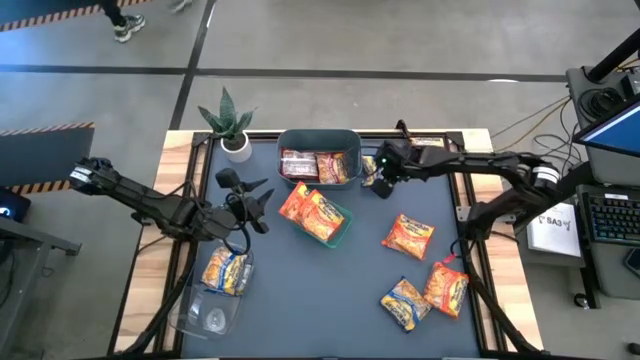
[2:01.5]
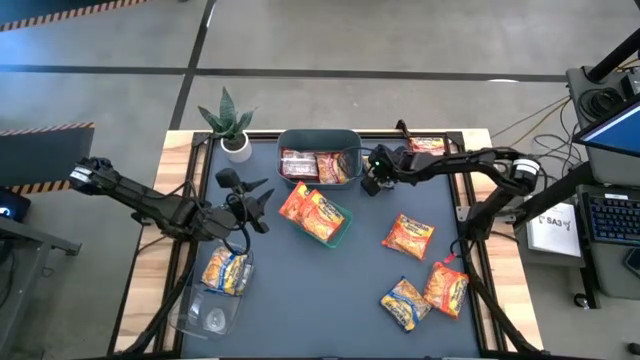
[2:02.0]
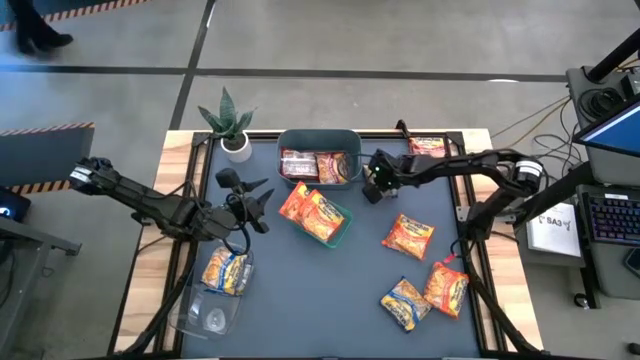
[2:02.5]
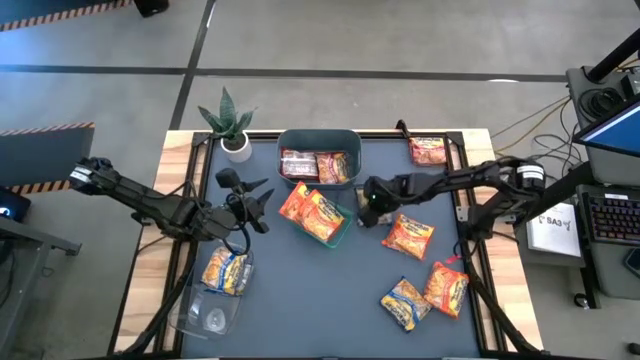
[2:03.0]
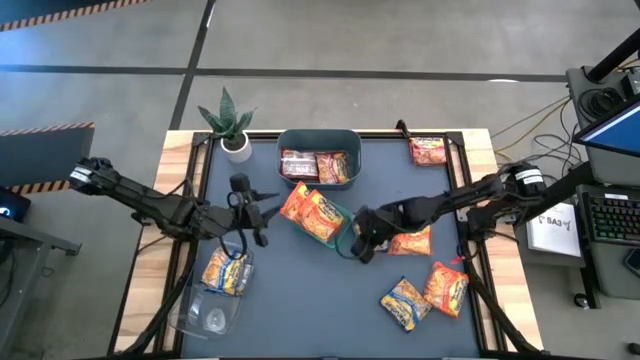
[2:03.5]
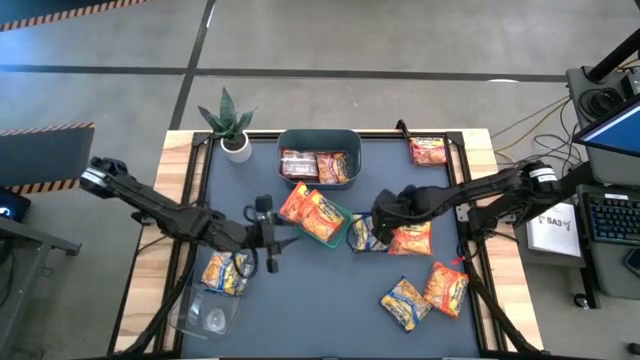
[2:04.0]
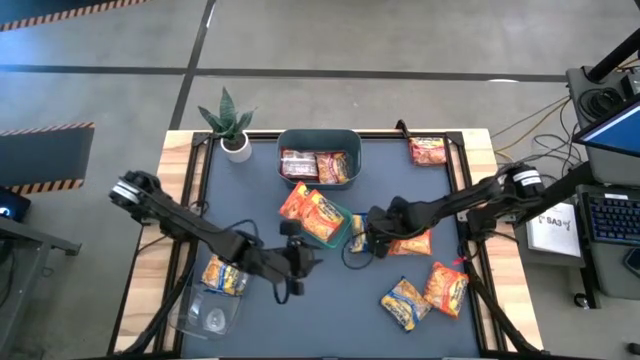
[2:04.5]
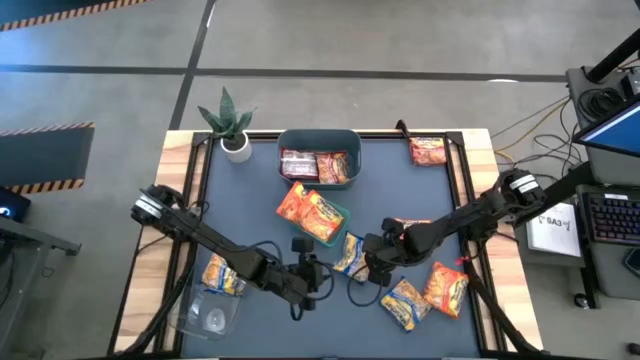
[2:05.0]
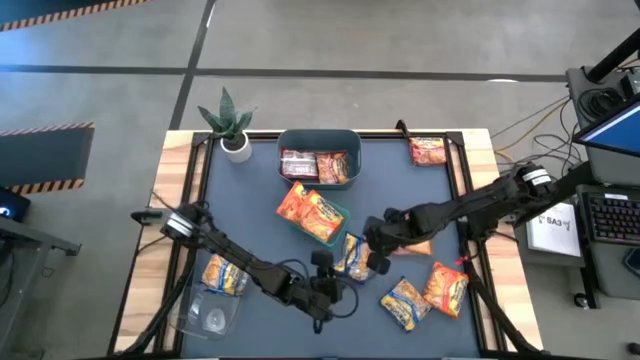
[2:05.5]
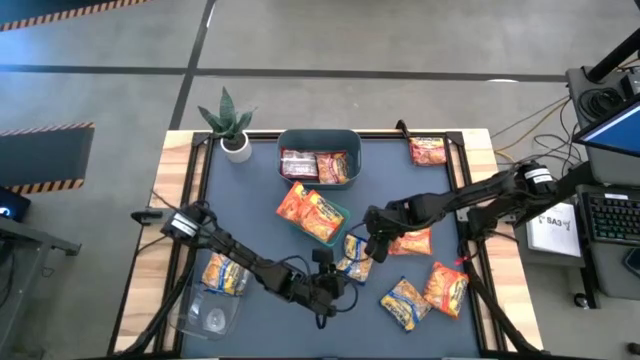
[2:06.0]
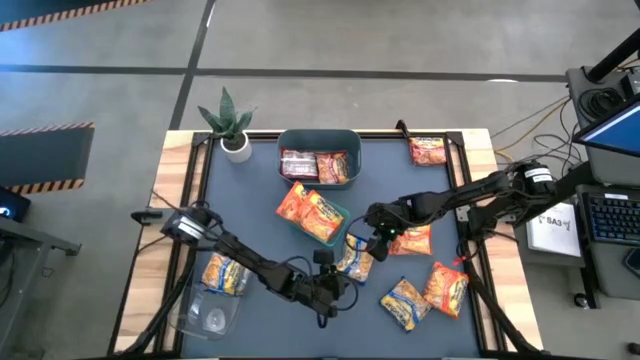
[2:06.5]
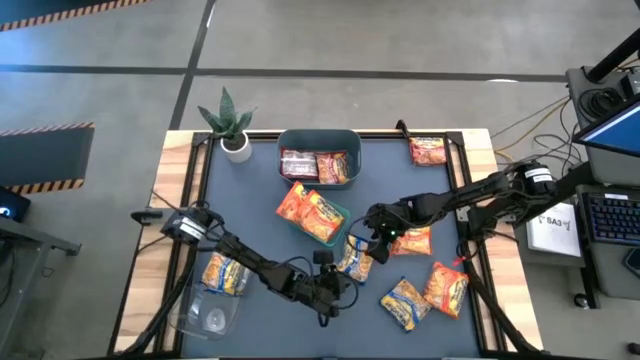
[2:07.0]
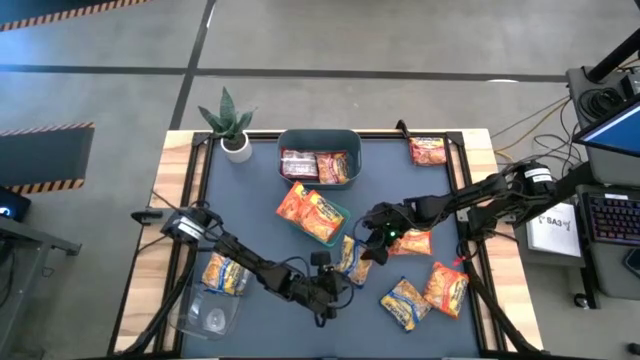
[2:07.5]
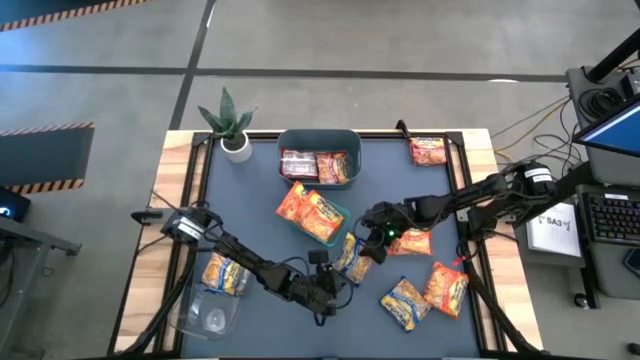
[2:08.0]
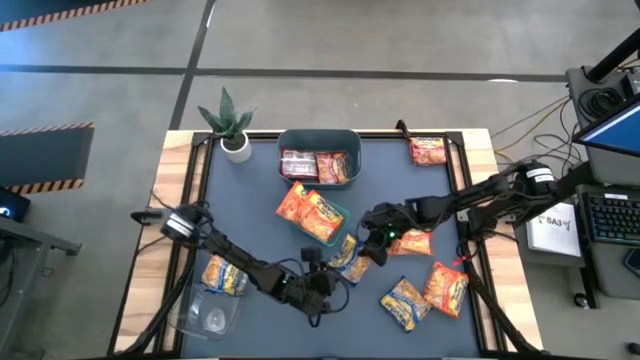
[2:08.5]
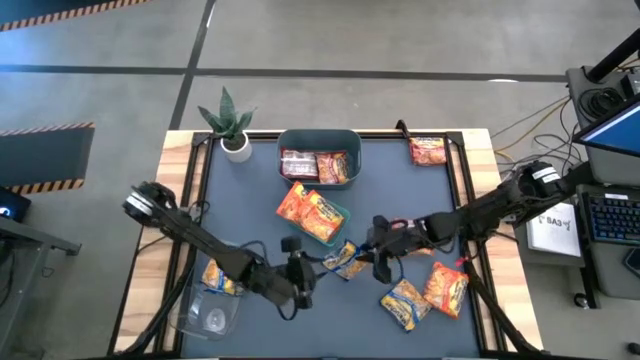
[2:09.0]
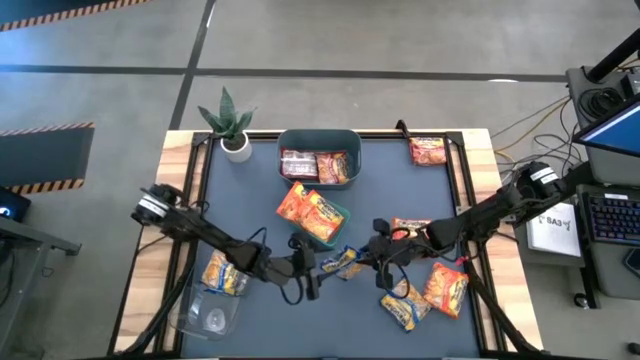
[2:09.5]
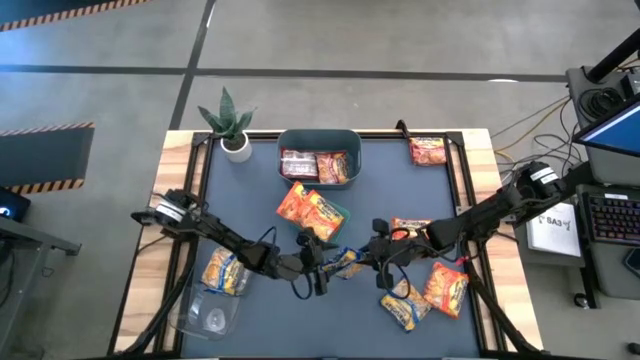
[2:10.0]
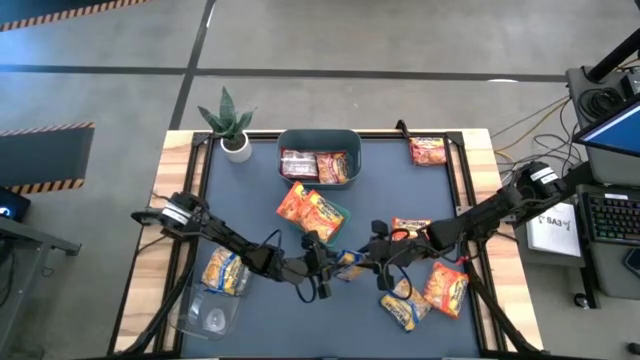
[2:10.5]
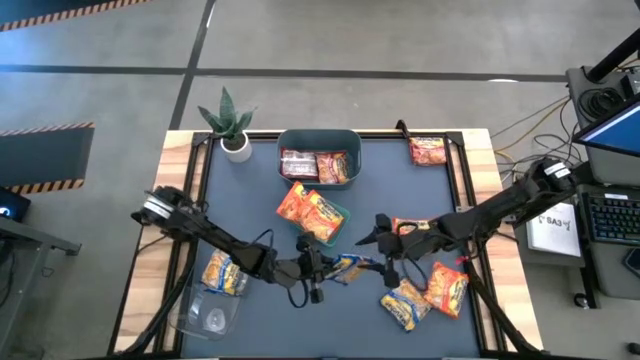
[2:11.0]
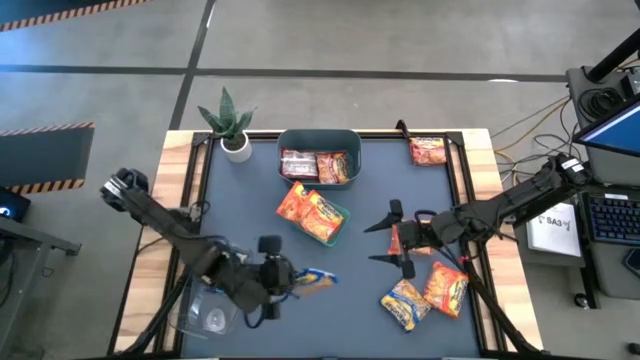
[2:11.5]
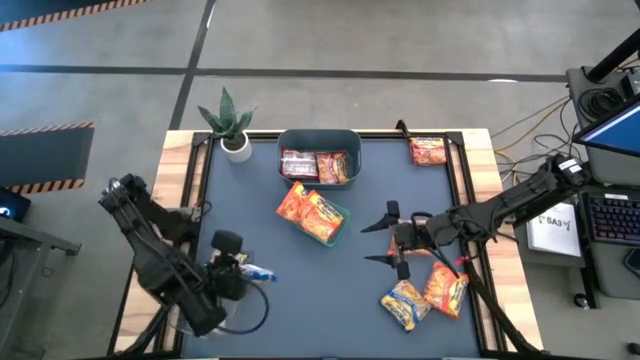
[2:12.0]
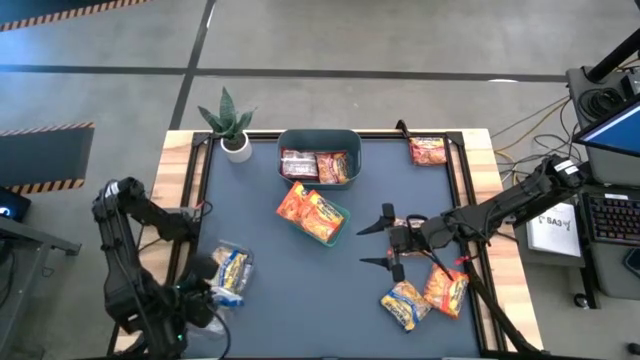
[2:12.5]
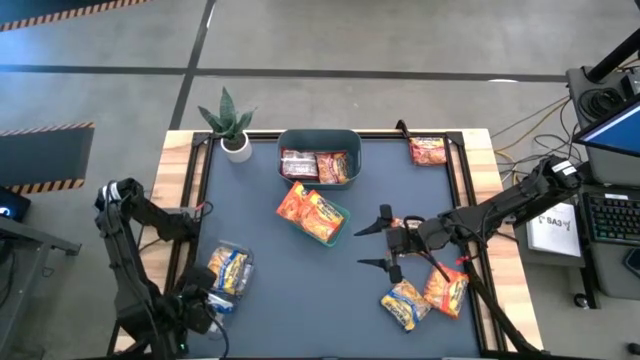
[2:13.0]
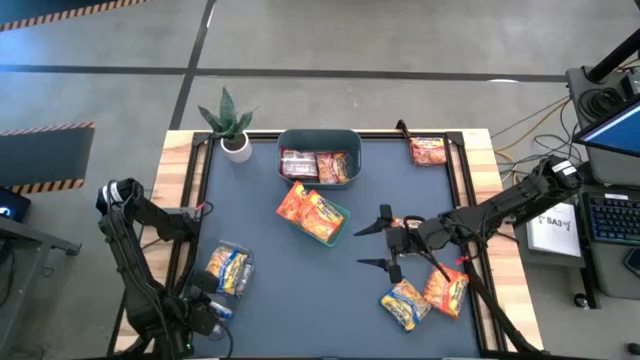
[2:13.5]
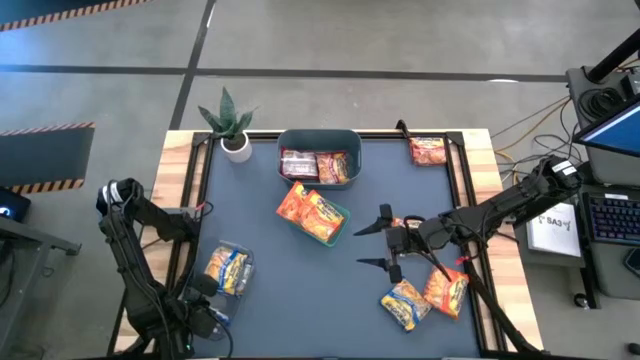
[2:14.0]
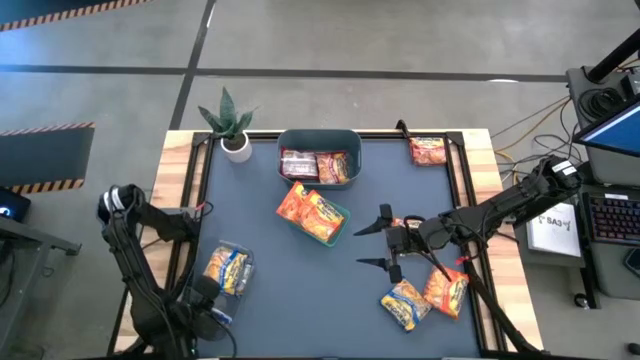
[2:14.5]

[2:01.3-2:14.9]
Task: Sort Maruchan noodles
Put the blue noodle pack into the transparent bin

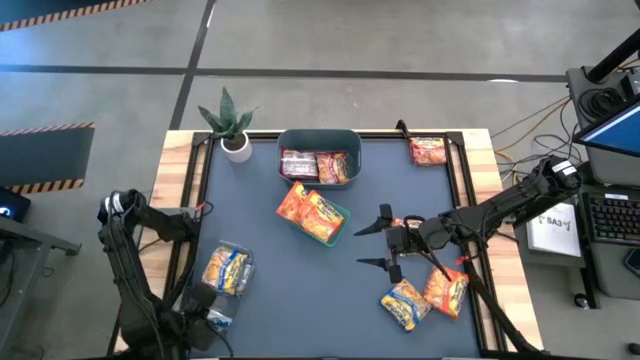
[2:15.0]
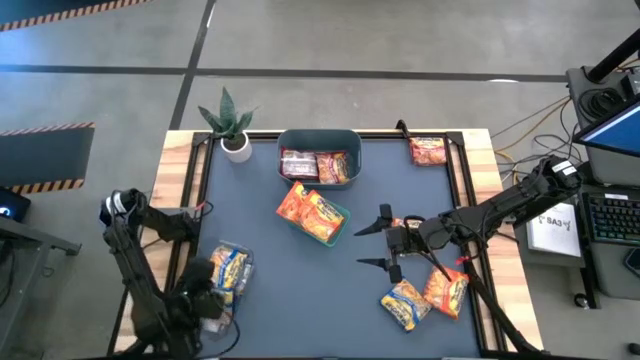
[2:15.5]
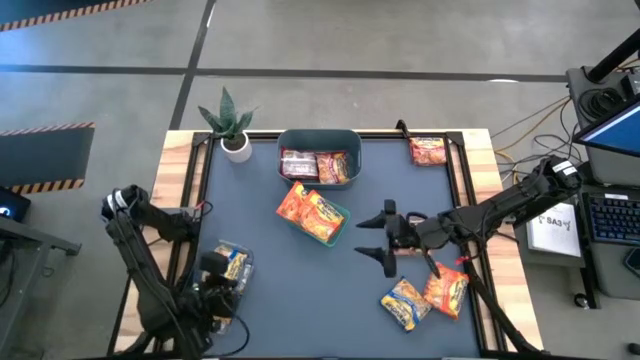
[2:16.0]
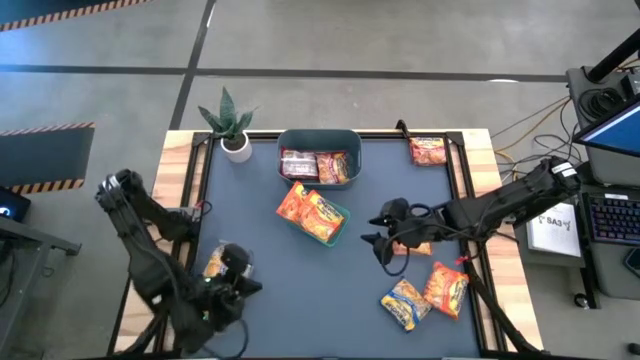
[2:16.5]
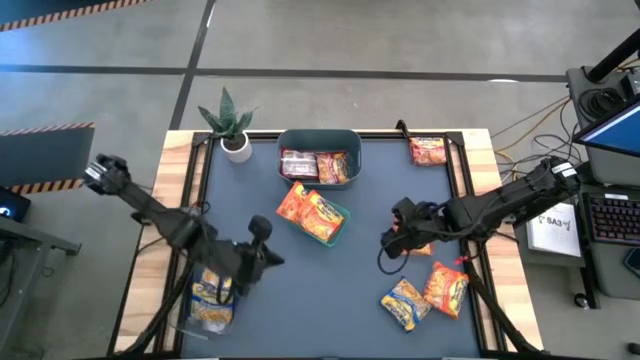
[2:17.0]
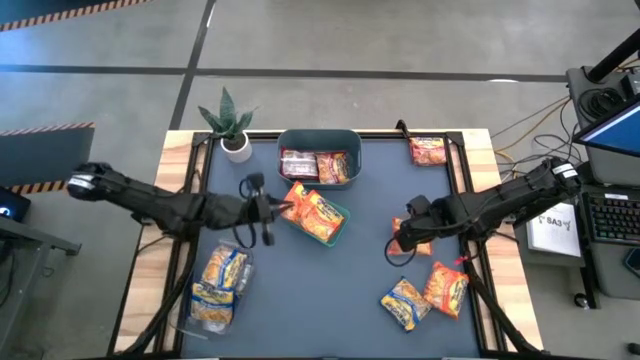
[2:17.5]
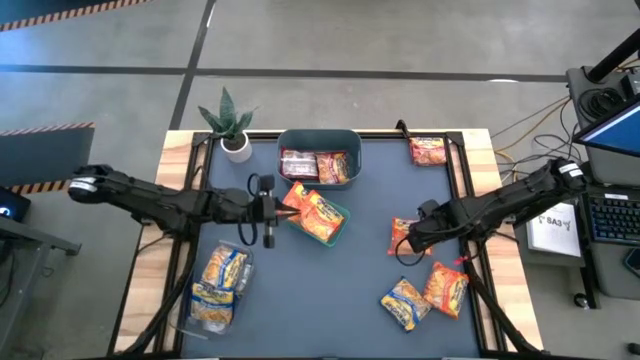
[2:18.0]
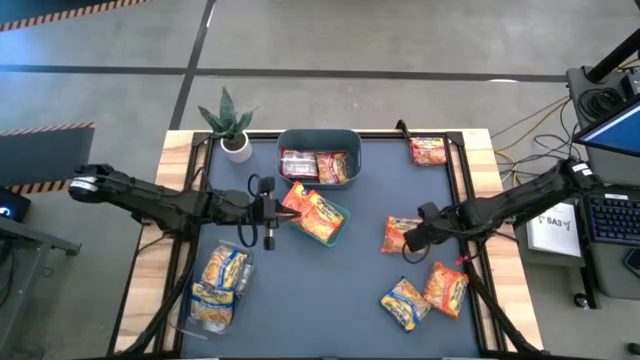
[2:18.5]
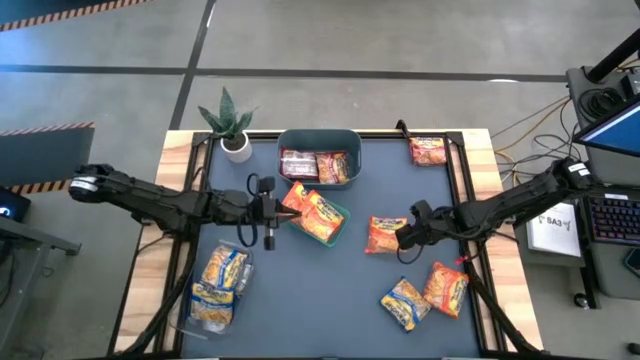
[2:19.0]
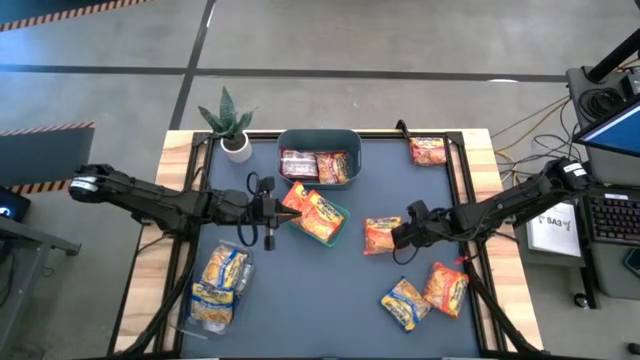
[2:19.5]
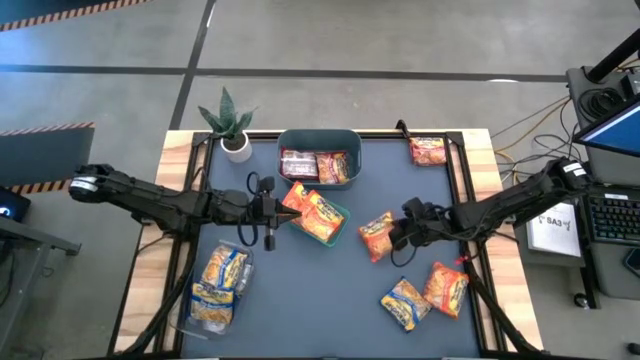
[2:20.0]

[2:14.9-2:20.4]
Put the orange noodle pack into the green bin

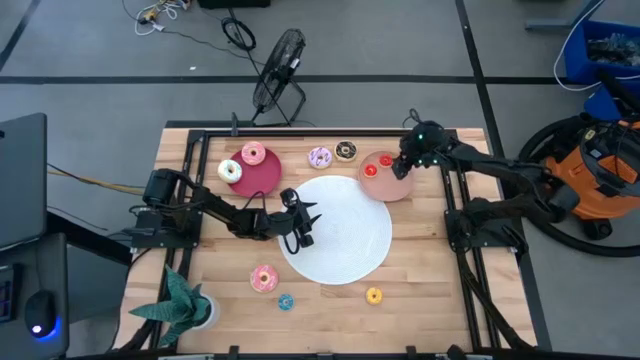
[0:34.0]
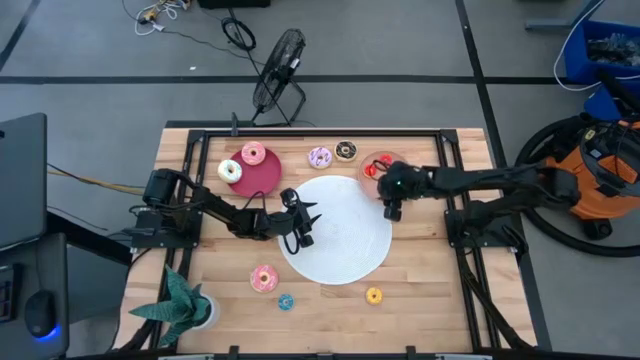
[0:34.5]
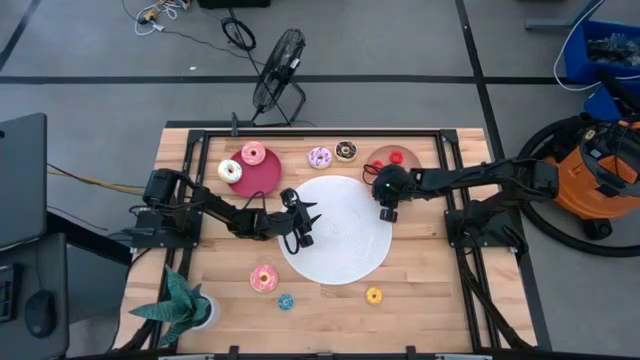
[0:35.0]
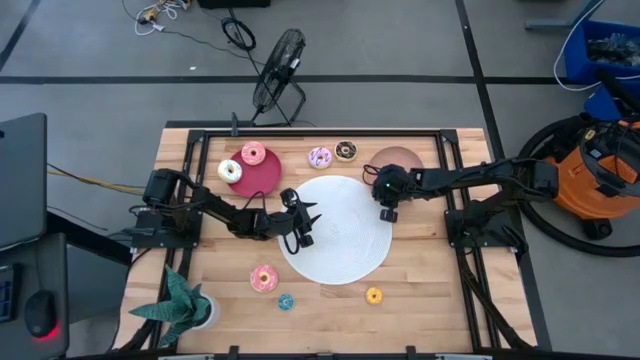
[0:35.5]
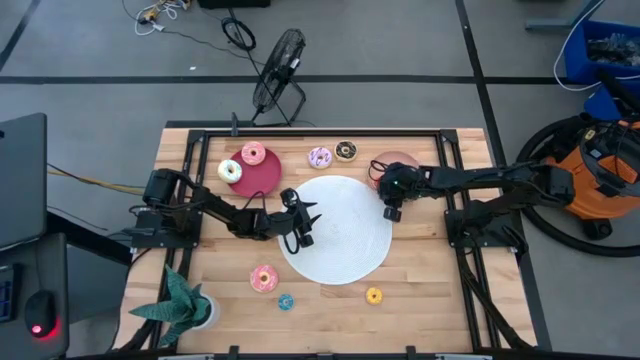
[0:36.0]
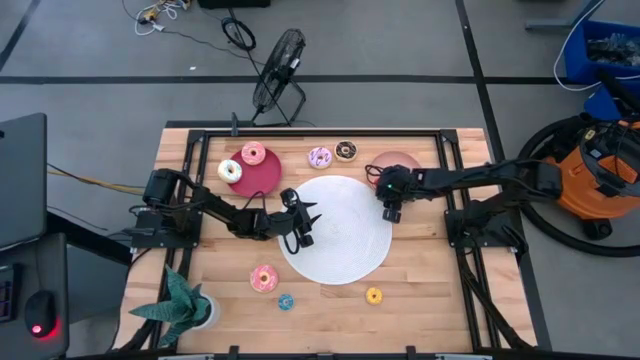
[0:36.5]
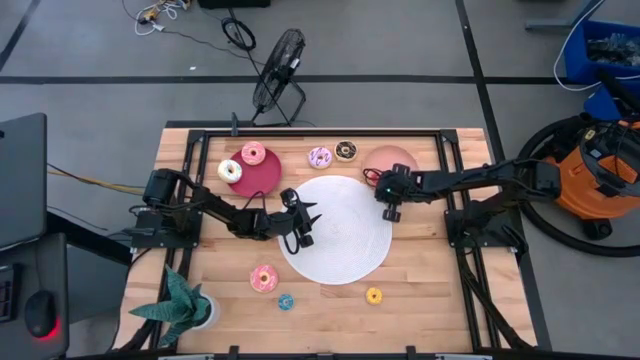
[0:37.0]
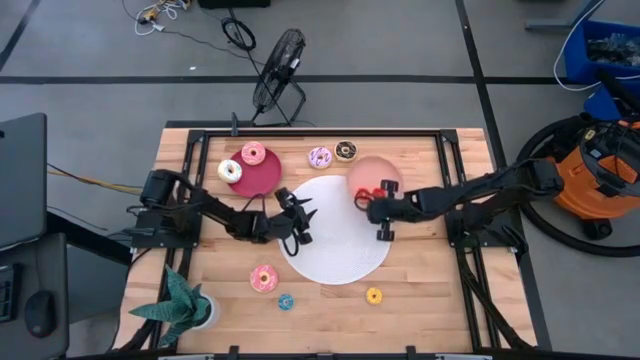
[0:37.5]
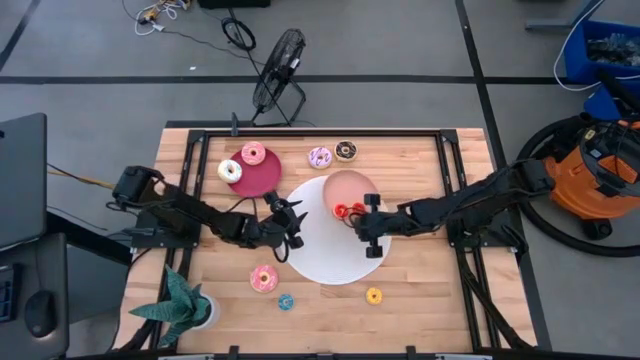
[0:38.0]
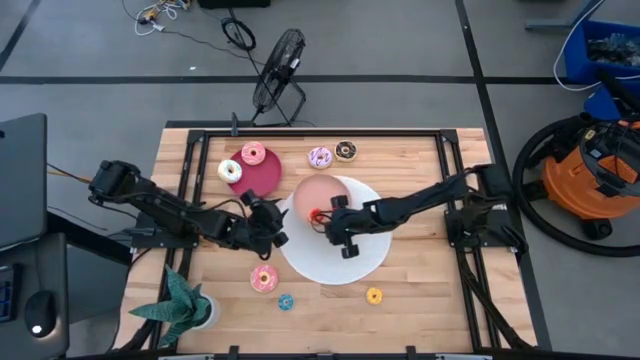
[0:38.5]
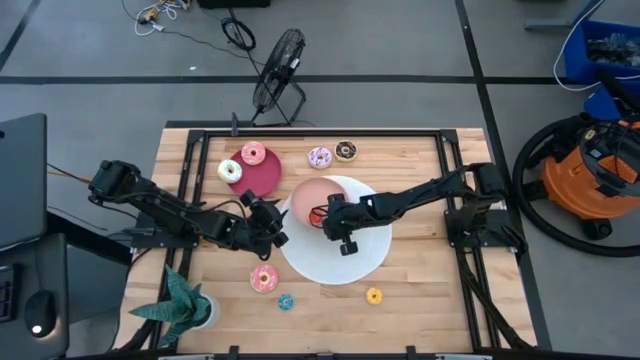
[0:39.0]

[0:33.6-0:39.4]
Task: Pick & Place donuts
Move the light pink plate to the center of the table
